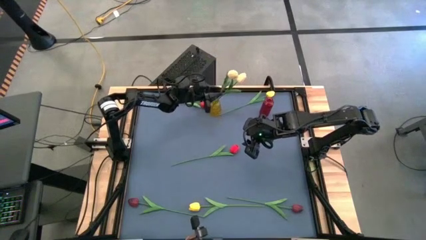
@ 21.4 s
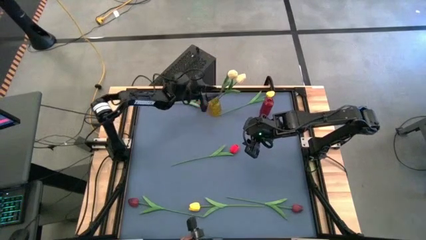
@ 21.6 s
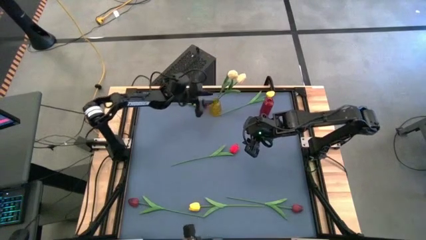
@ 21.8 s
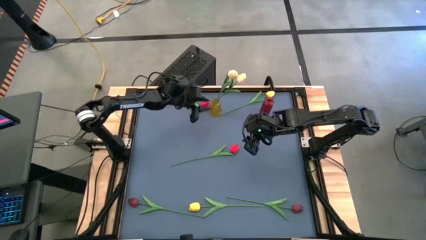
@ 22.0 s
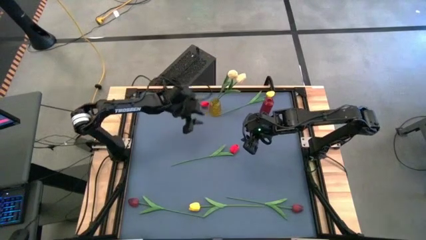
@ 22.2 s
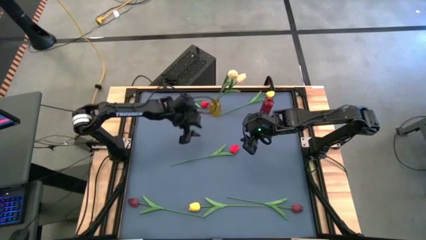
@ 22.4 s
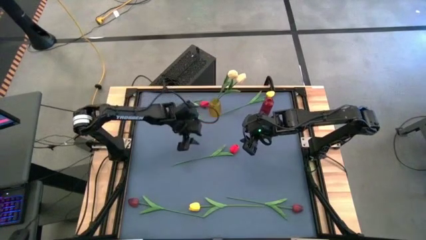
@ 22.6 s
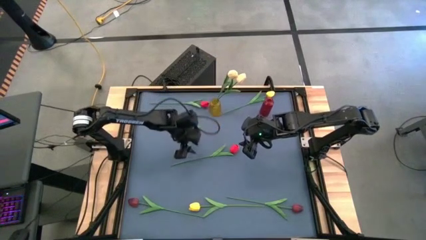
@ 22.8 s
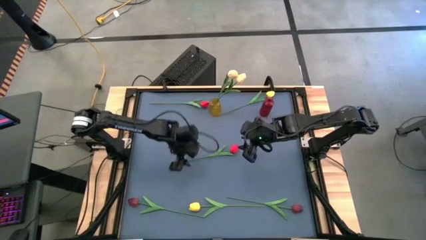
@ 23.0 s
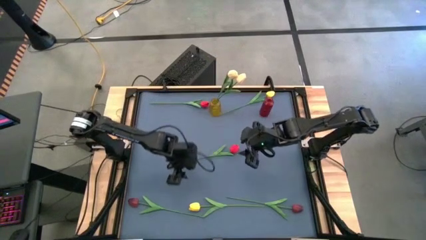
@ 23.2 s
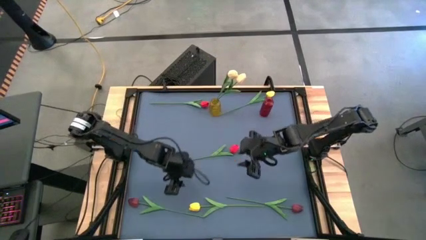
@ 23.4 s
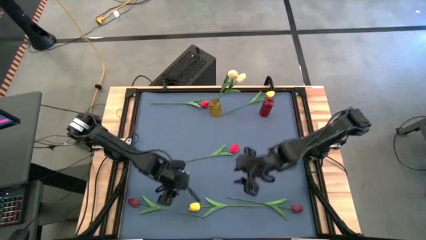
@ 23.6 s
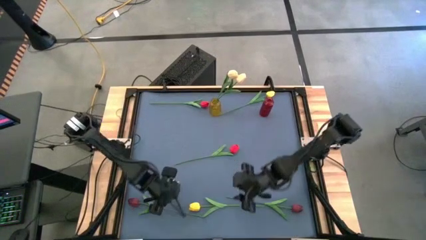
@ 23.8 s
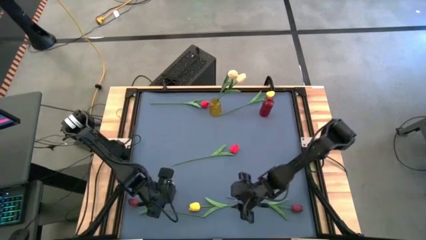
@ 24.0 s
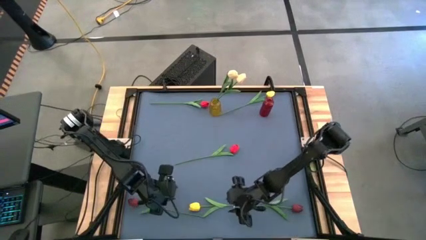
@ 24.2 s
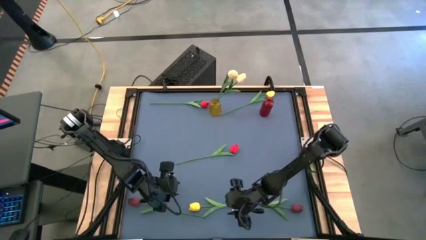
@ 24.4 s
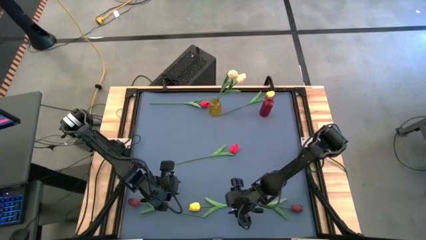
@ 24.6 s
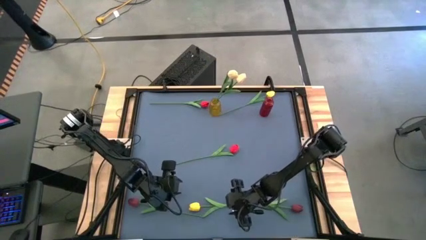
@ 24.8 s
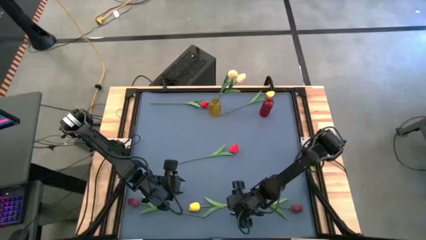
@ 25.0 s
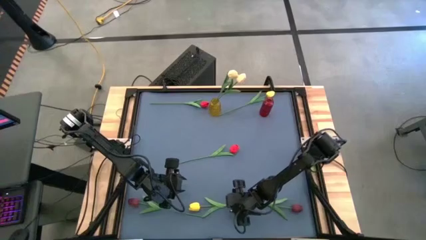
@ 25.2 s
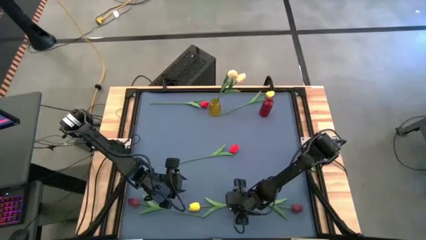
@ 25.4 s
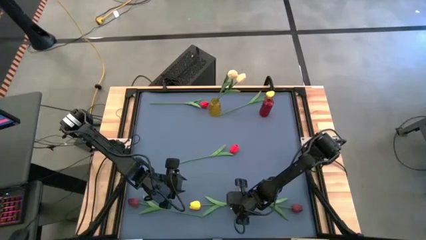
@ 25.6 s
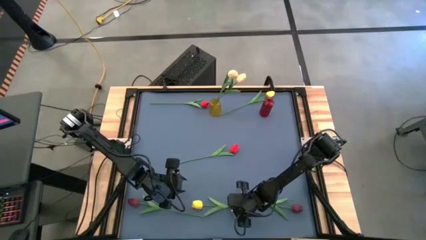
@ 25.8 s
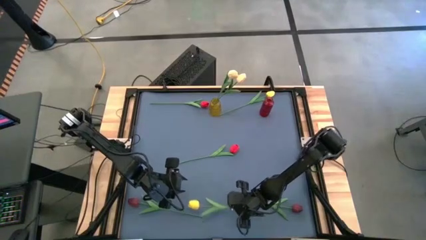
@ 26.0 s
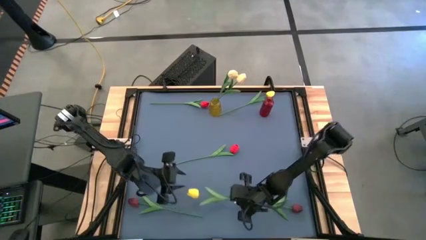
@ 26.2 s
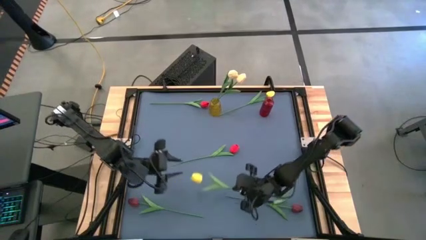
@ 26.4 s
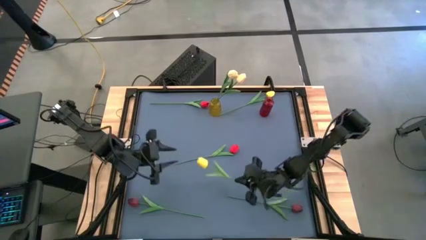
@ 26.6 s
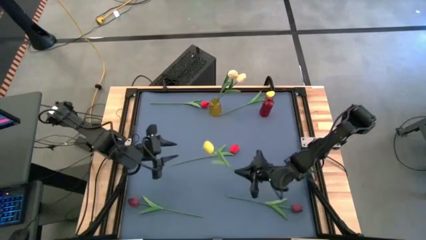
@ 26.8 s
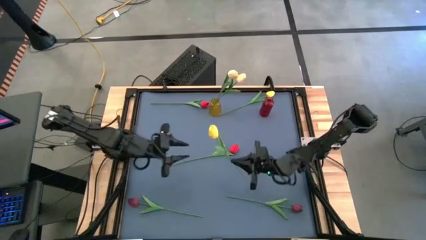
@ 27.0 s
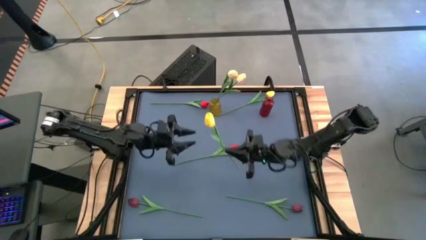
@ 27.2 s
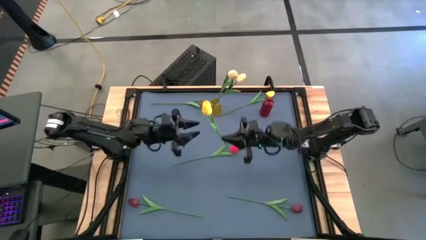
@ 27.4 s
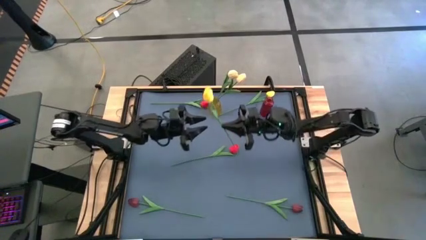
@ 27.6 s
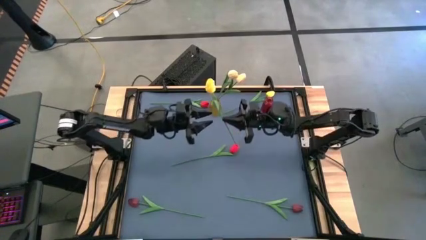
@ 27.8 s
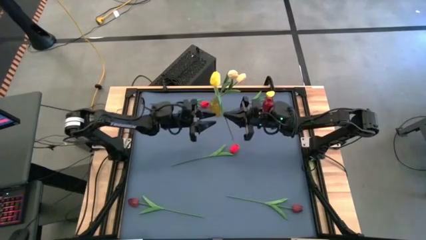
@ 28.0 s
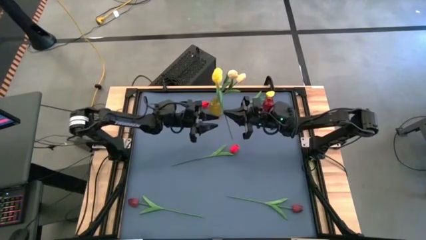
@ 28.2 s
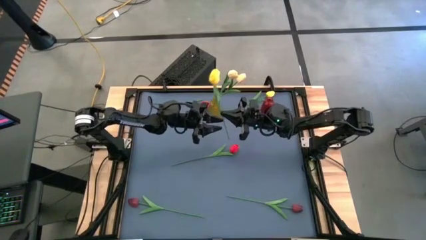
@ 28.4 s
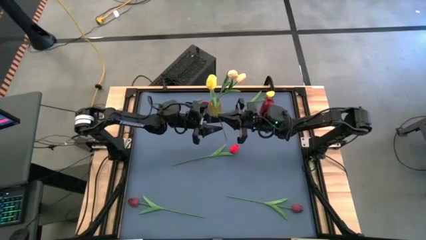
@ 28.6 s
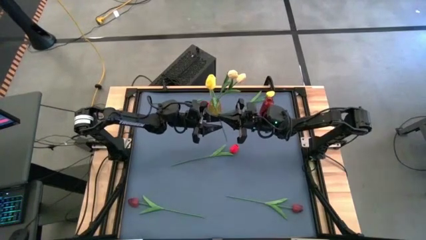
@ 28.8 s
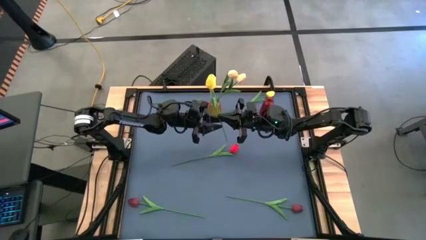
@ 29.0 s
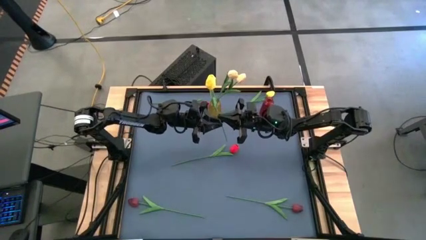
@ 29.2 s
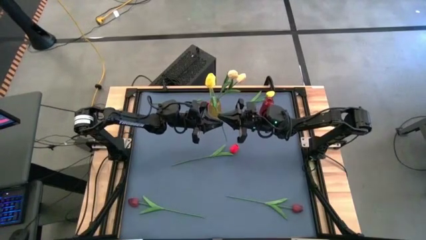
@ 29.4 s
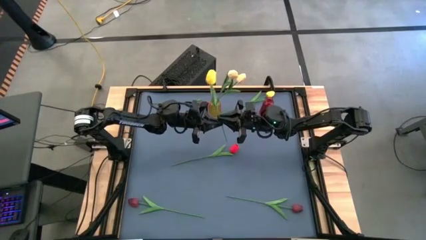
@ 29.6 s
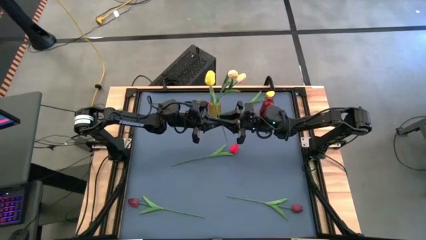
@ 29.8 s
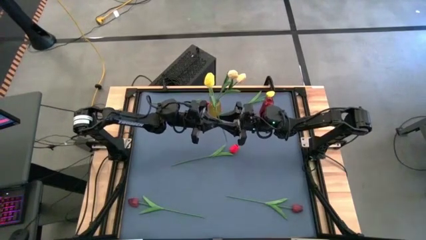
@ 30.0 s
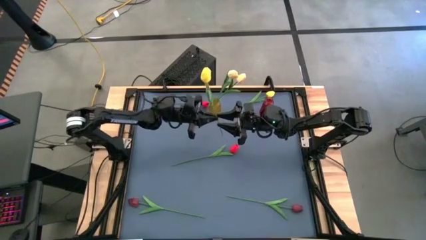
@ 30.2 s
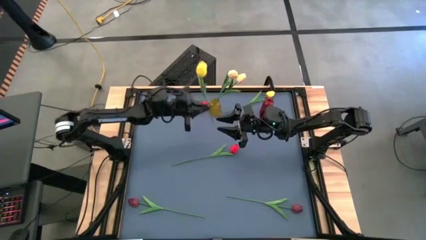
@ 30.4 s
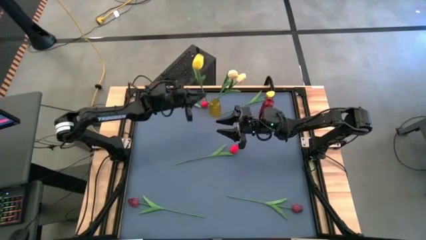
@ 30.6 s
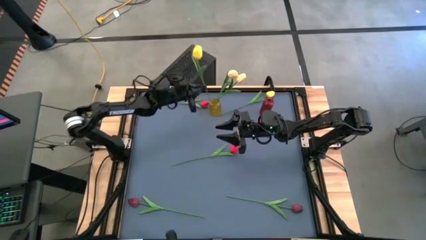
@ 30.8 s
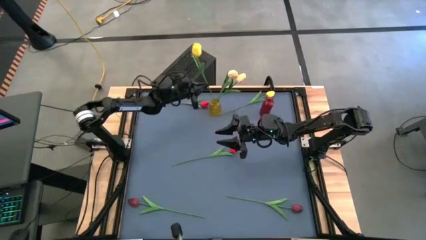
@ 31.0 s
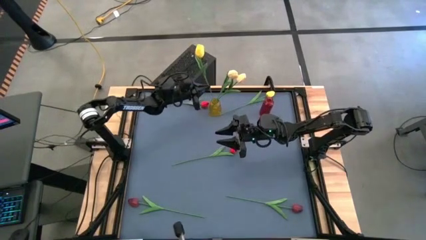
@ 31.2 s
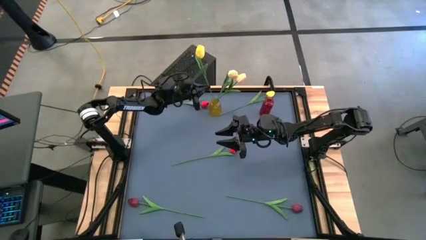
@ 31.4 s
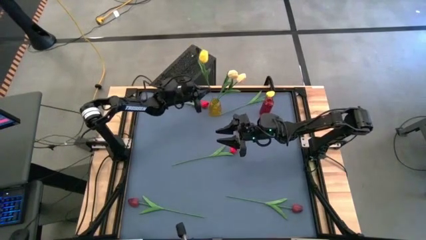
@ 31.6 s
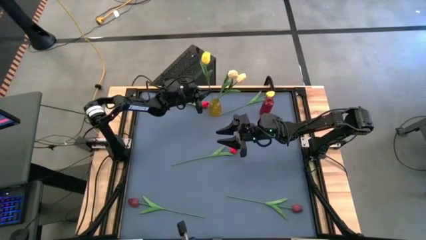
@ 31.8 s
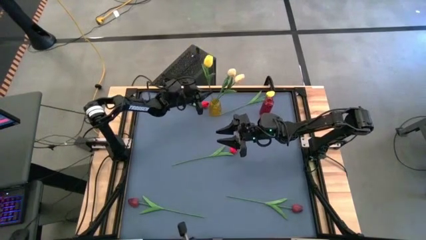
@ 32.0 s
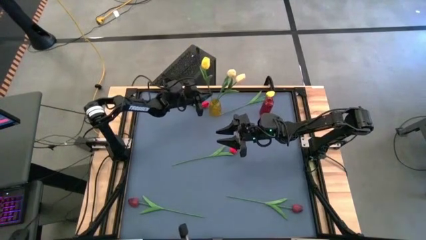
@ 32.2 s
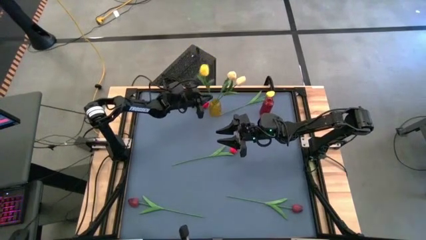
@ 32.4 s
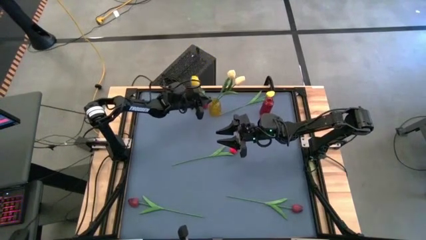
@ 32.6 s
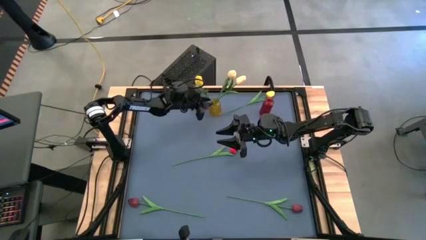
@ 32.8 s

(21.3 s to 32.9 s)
Task: Sort flowers into vase by color
Put the bottom yellow flower into the yellow vase

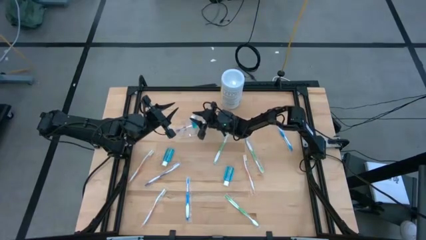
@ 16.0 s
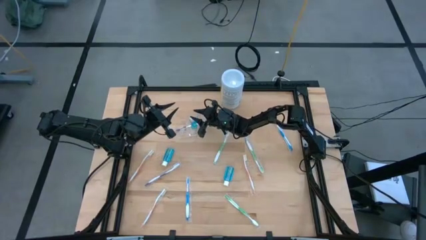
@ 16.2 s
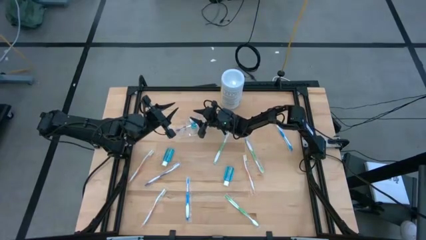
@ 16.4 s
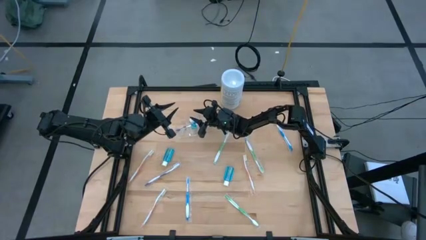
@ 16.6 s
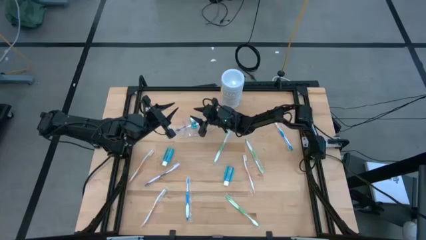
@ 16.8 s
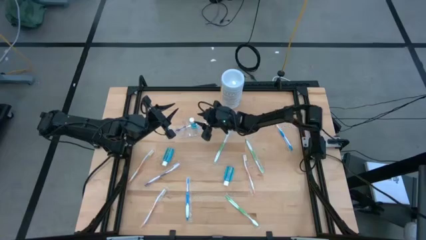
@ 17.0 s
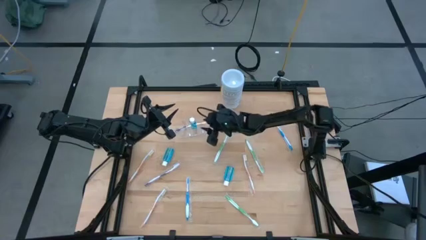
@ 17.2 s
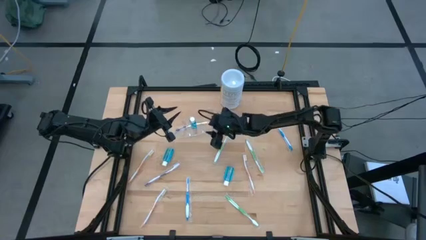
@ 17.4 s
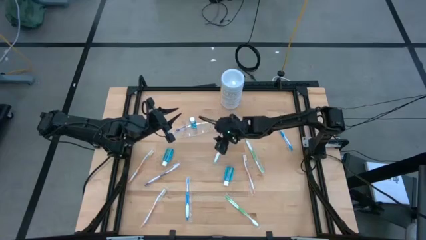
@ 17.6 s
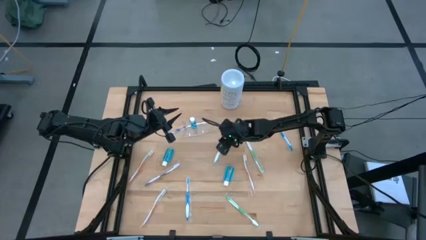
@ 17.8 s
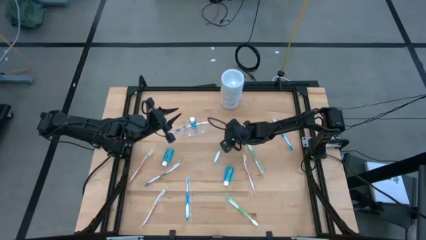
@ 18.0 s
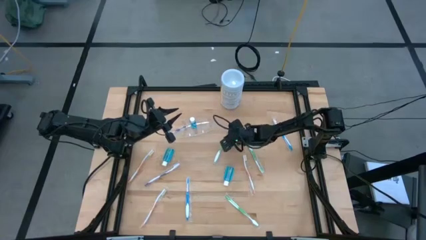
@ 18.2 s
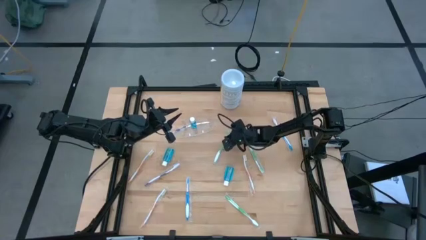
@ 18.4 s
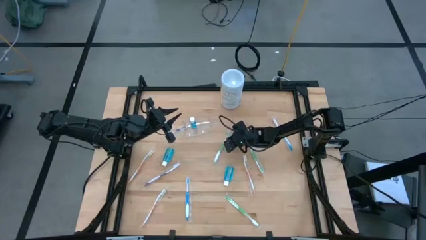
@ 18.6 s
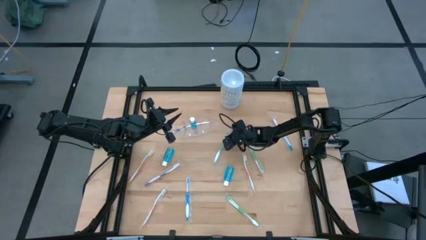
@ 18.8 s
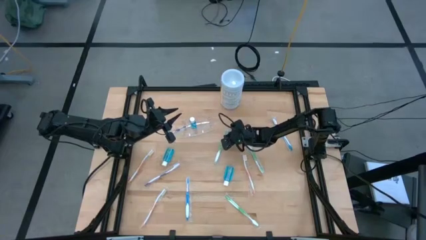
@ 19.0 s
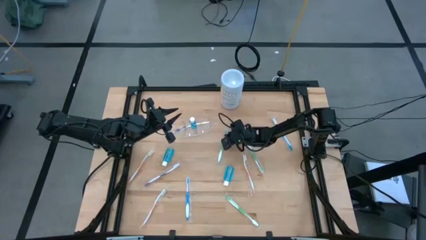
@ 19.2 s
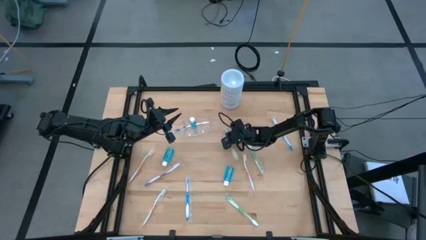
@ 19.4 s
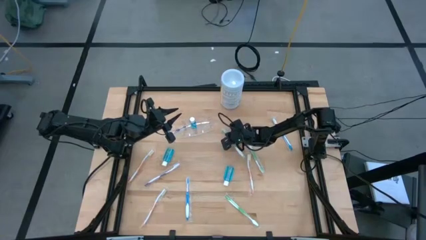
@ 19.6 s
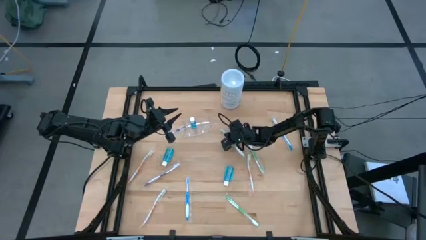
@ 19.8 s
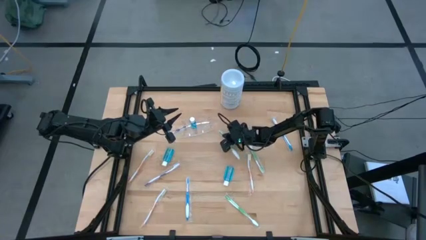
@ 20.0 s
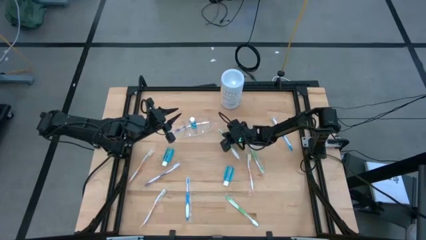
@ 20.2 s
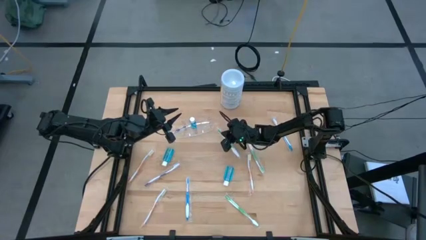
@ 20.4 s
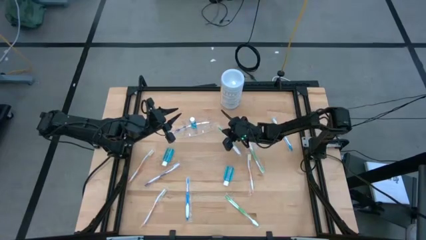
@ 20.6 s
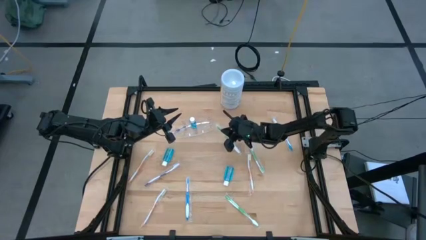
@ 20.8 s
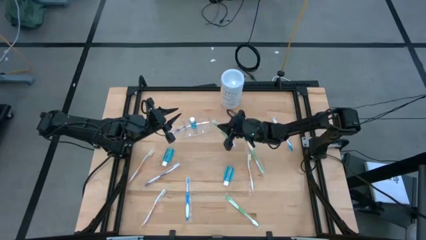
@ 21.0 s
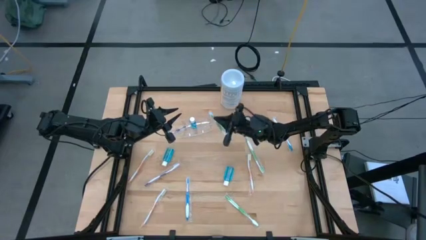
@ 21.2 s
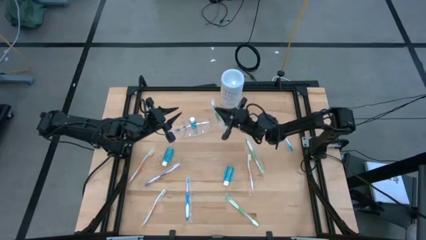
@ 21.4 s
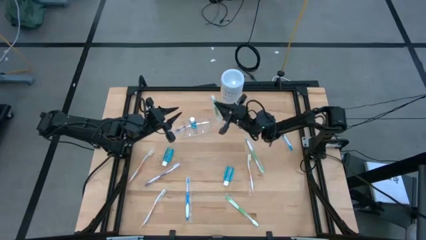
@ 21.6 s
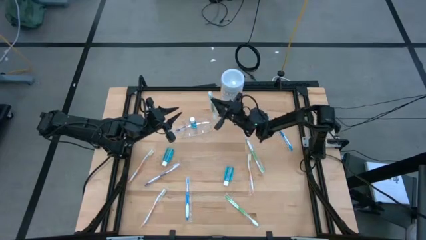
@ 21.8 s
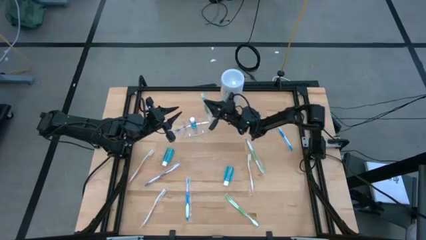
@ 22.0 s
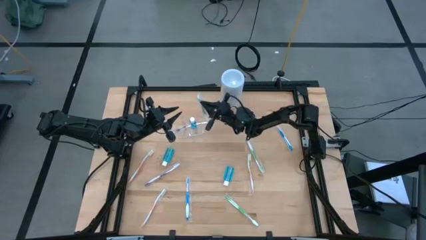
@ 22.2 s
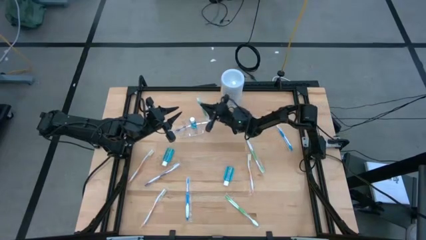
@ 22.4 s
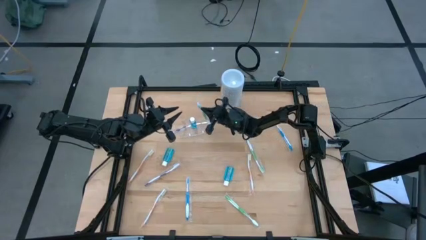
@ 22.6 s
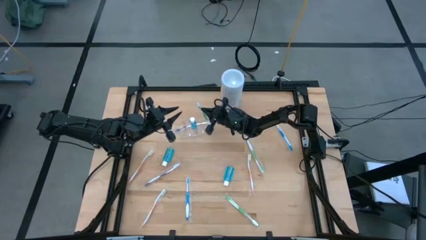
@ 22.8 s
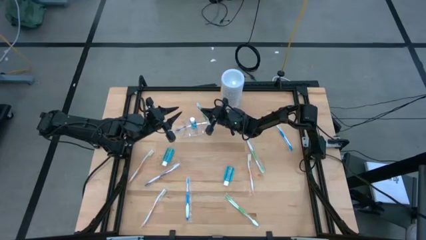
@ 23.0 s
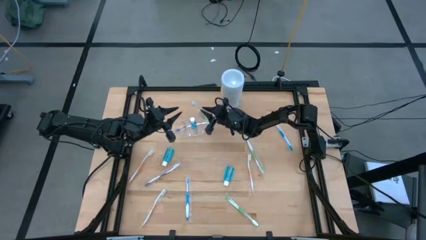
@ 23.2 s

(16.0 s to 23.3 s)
Task: Pick & Place toothbrushing station
Put the top left green toothbrush into the transparent organizer
